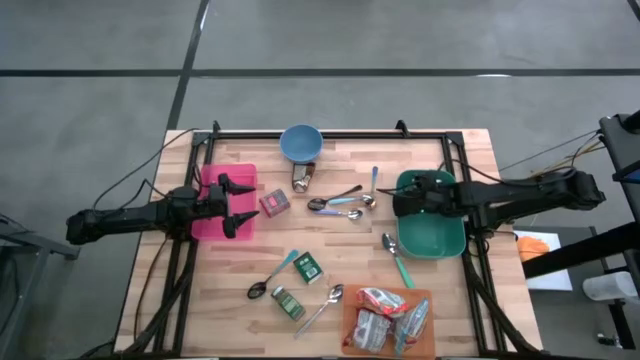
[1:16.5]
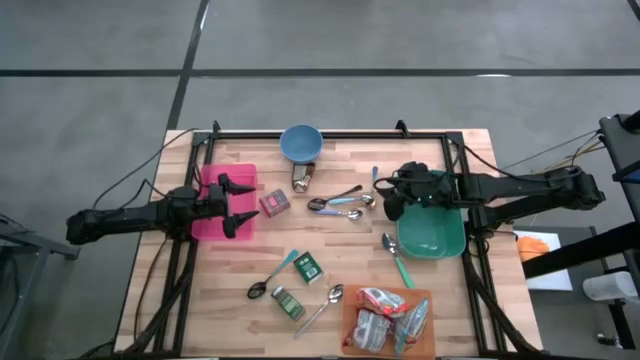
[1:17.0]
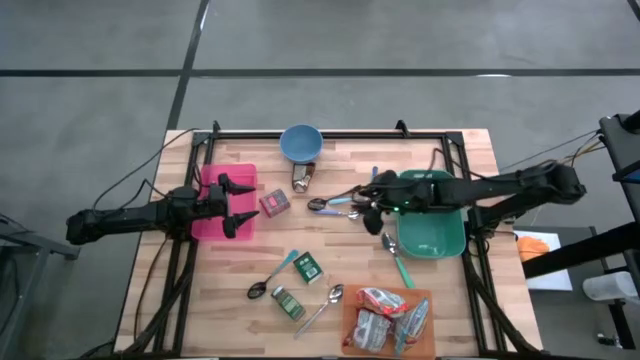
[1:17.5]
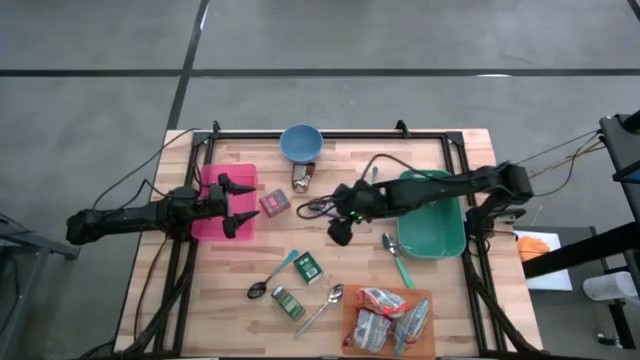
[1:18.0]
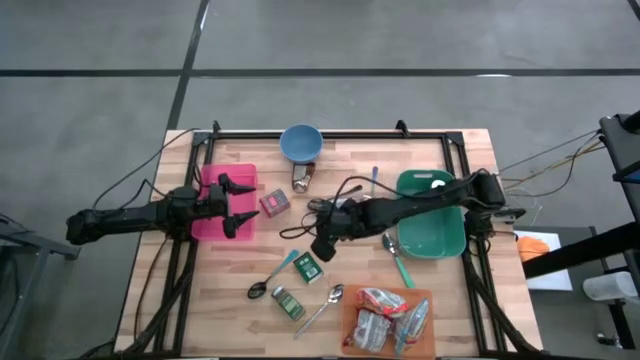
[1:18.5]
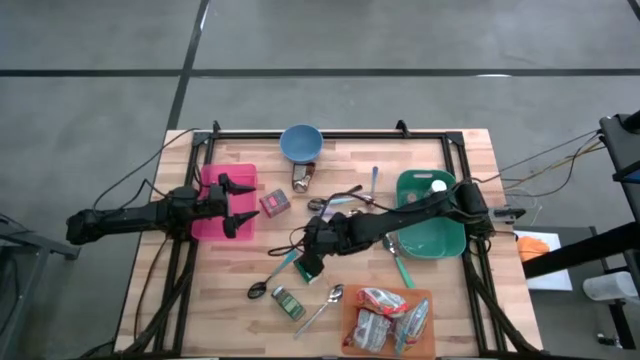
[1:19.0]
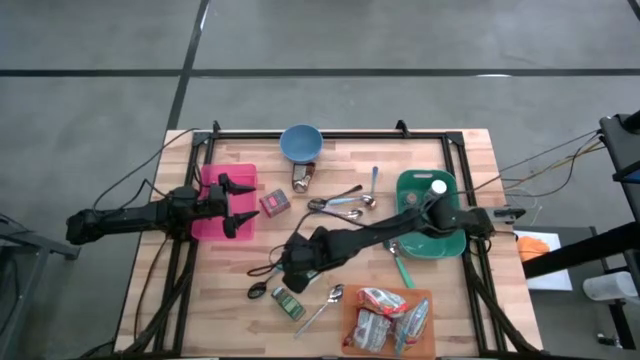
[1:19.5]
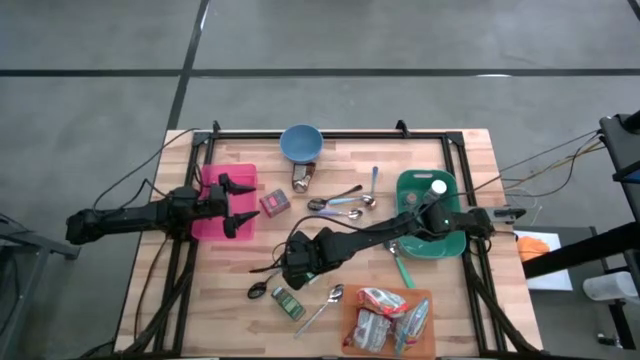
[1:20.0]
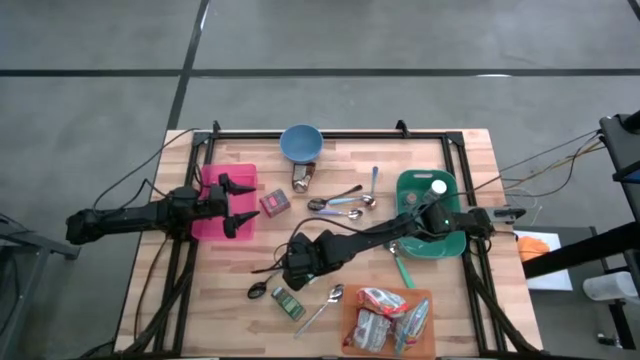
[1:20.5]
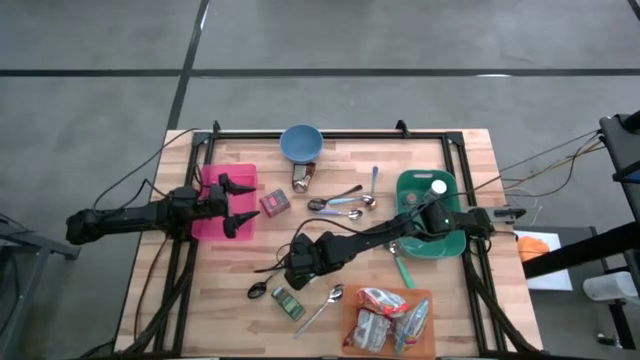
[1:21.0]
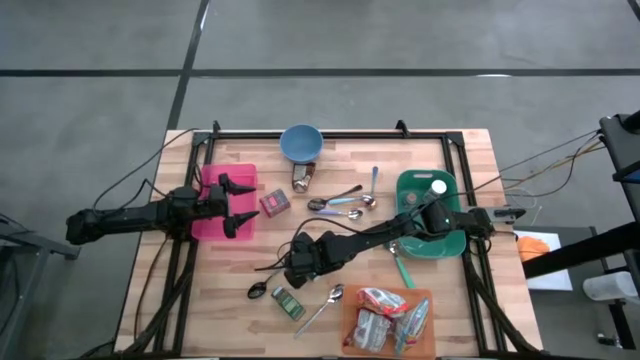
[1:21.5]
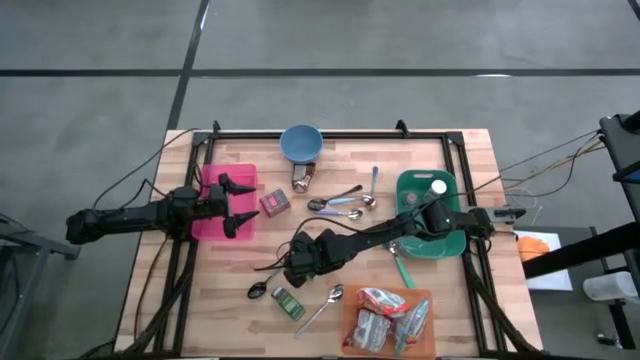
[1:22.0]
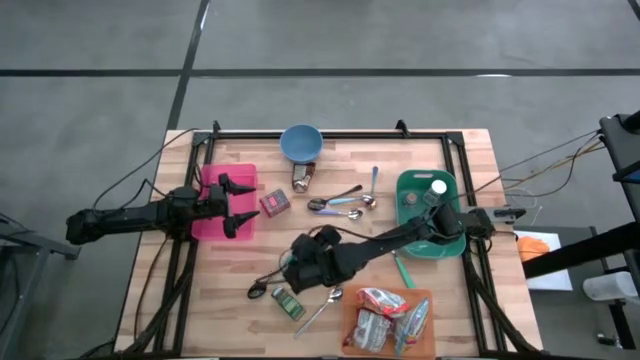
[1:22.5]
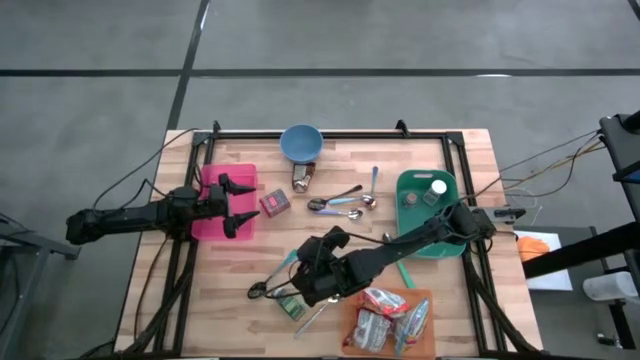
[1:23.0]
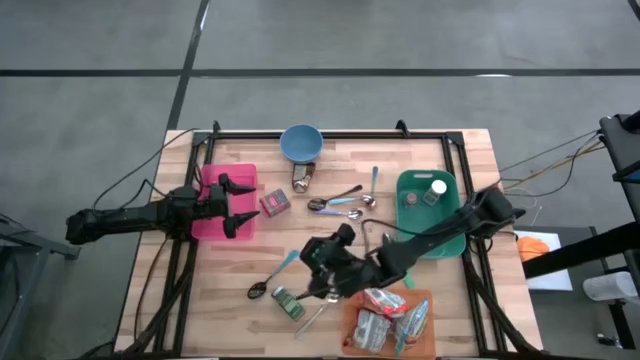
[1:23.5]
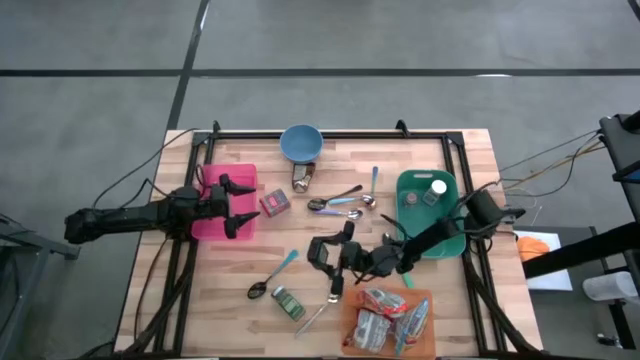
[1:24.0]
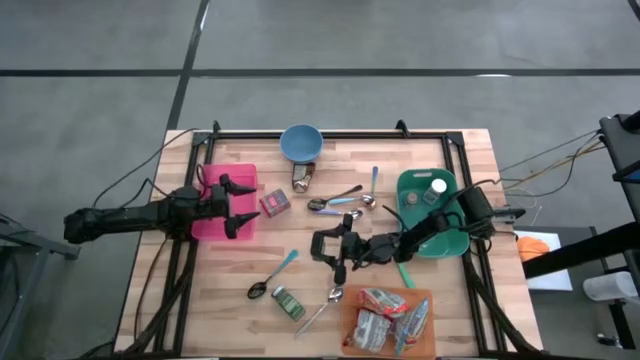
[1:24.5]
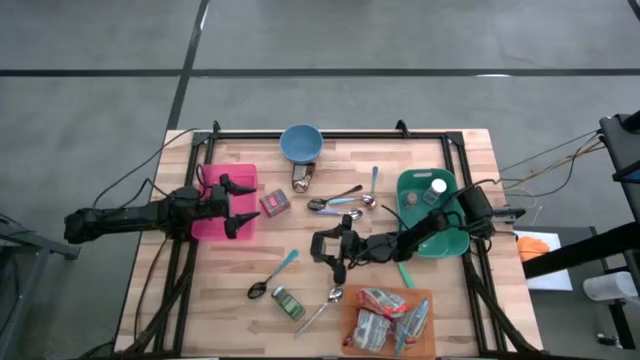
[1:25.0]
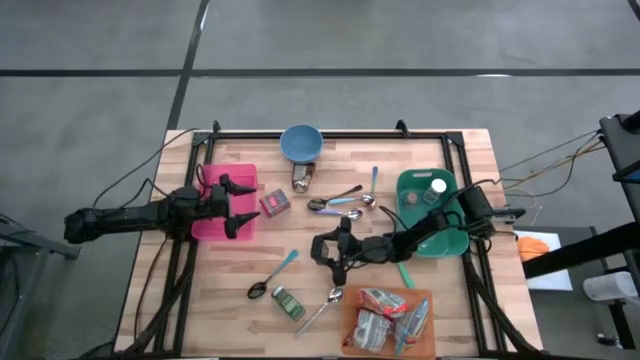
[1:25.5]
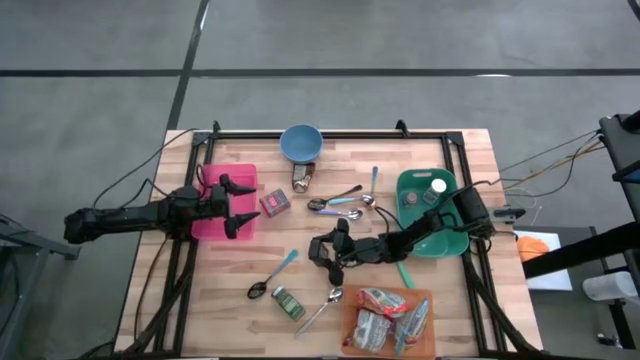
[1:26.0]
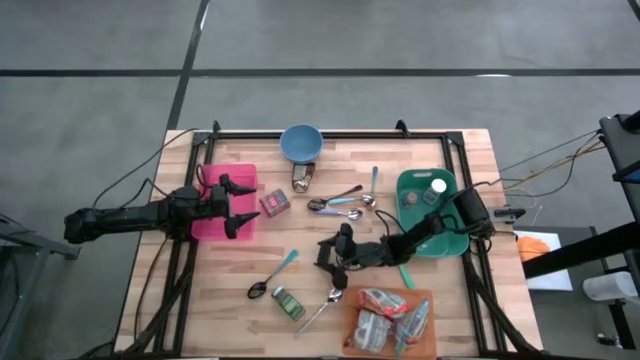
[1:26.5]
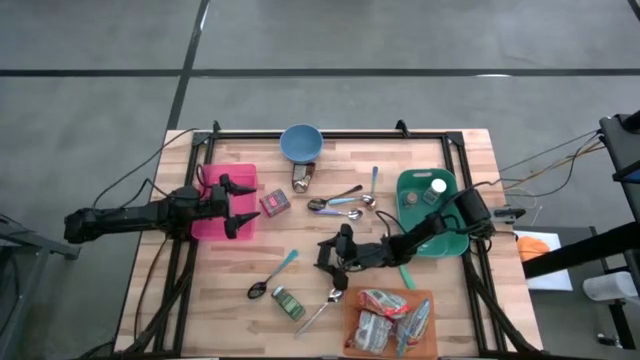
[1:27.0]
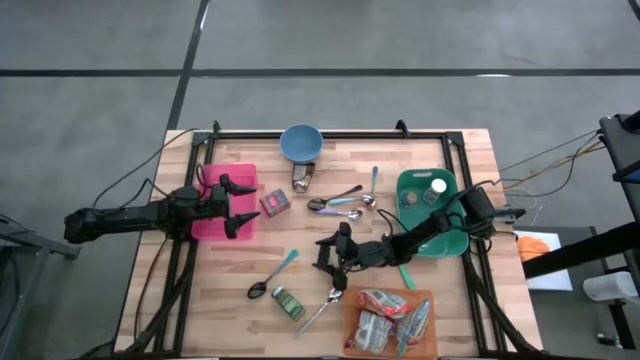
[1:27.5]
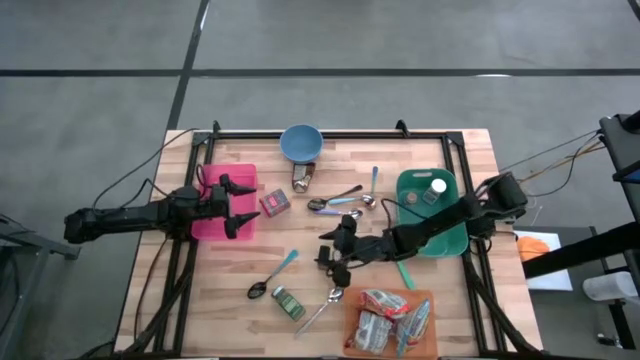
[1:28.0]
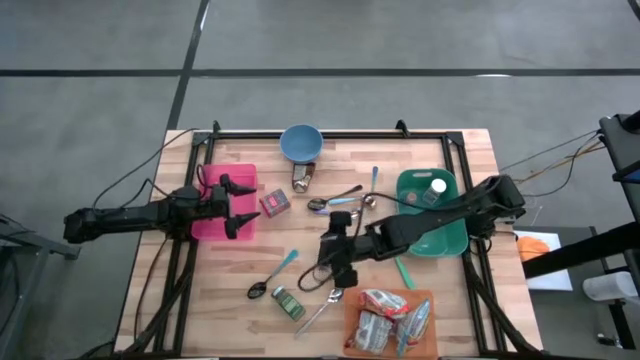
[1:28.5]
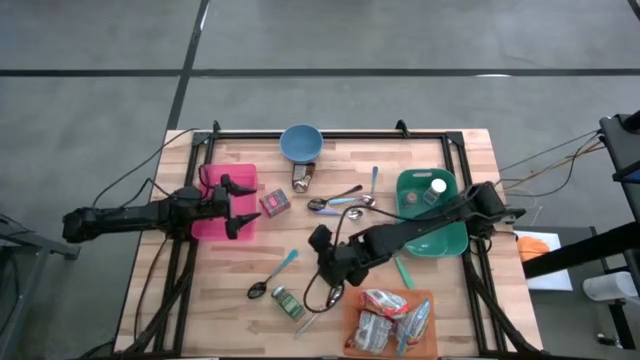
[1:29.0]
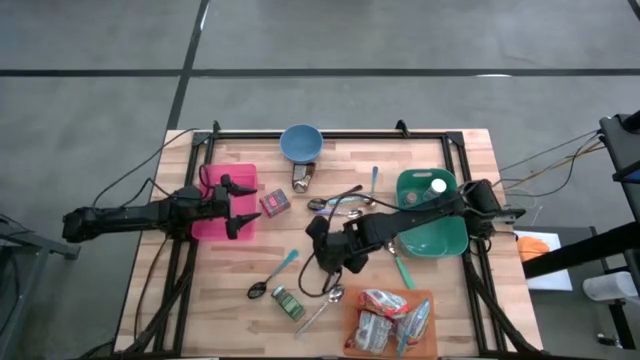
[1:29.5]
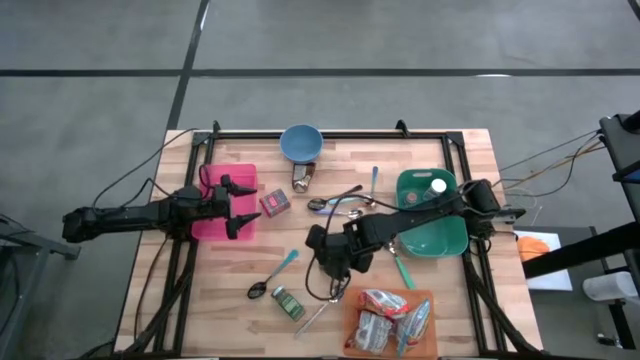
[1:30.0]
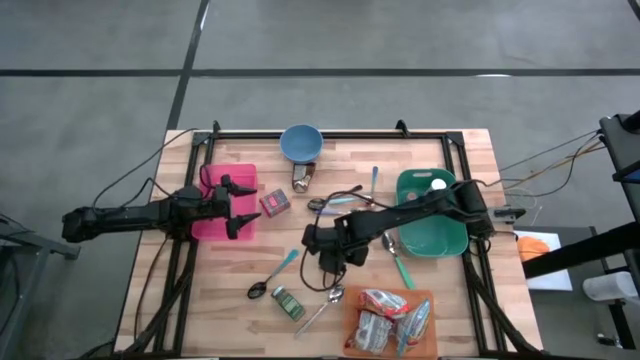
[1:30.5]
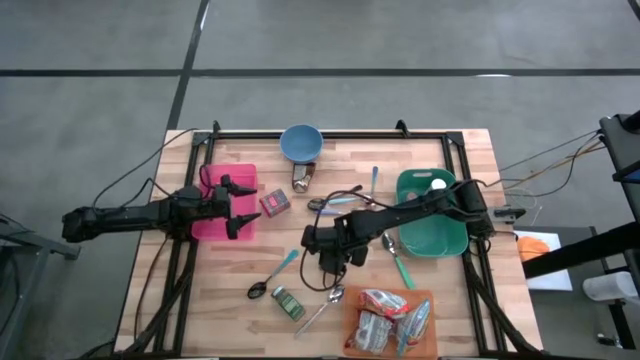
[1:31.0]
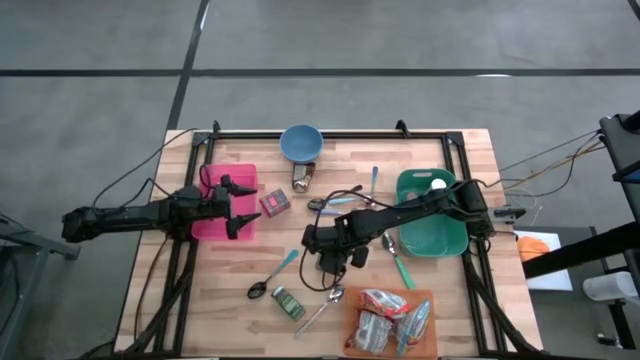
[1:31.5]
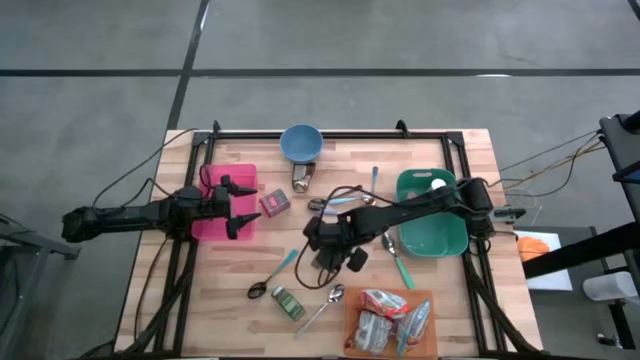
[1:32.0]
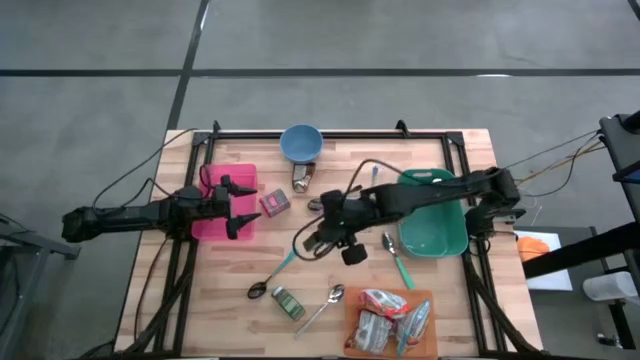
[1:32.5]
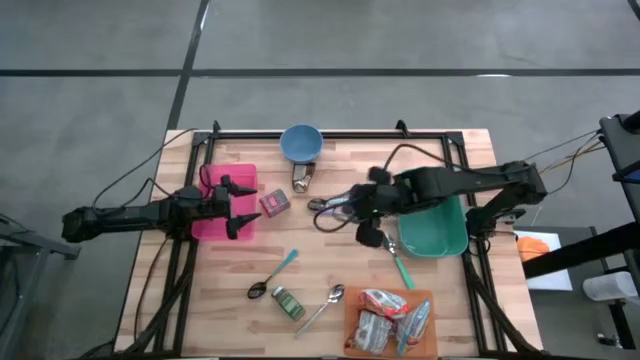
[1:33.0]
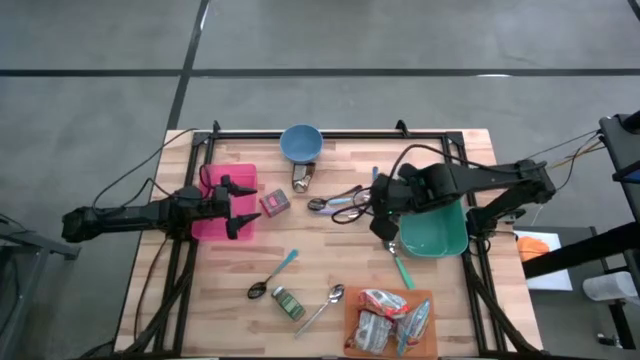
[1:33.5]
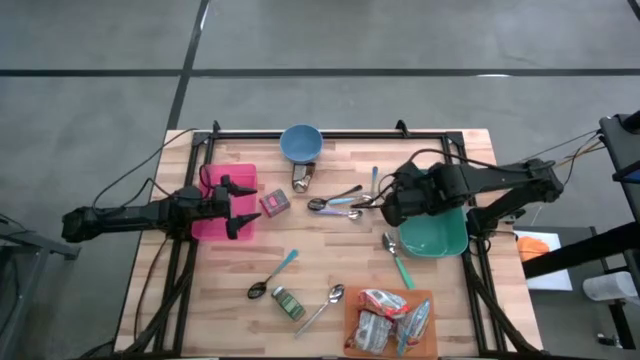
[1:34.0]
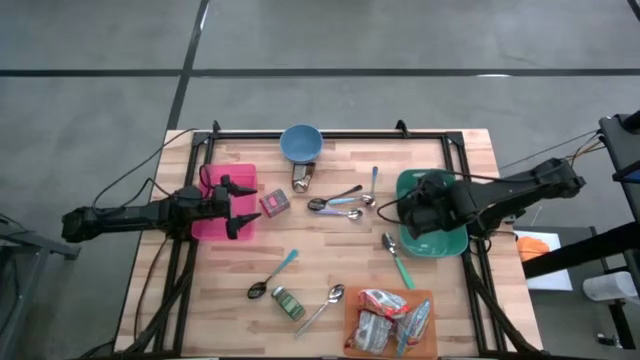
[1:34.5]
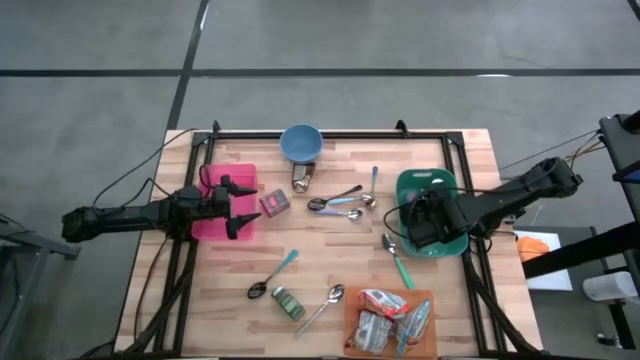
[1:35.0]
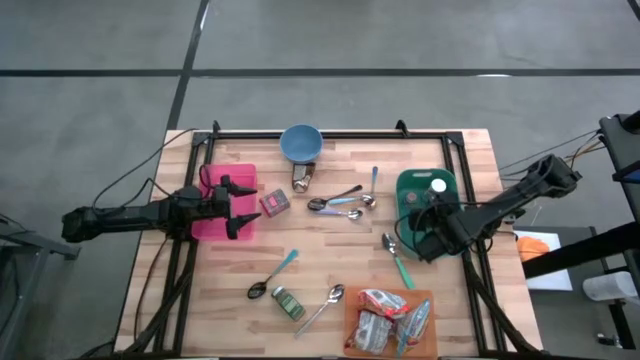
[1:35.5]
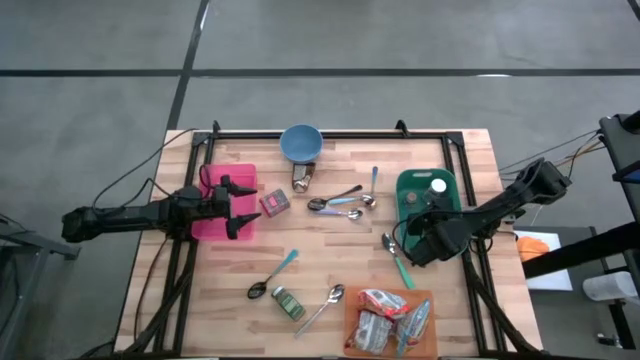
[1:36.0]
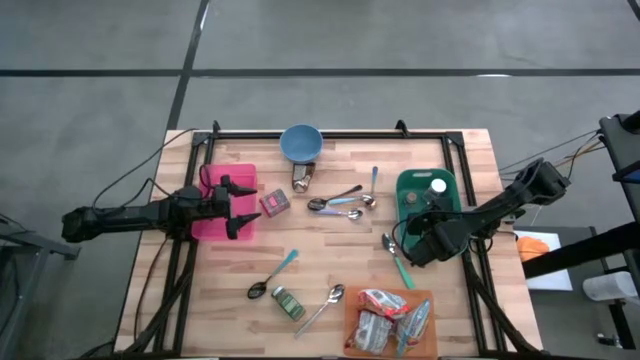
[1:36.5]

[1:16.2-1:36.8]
Put the green seasoning can into the green bin
